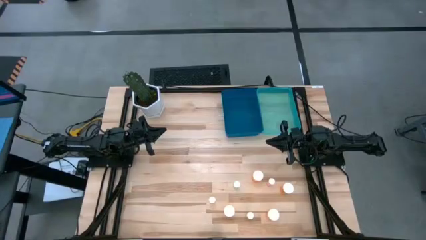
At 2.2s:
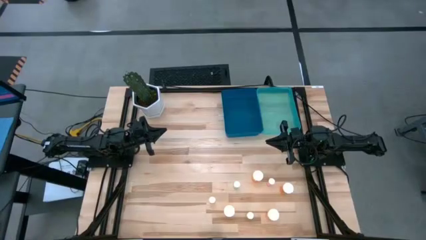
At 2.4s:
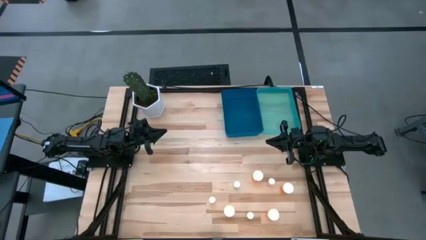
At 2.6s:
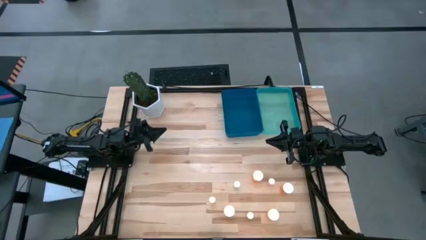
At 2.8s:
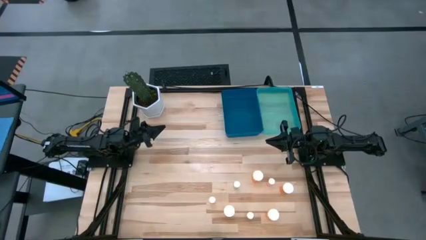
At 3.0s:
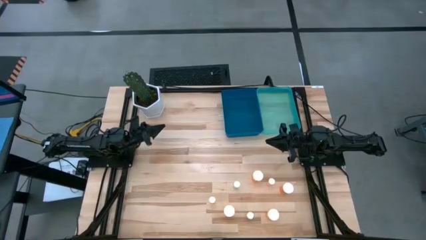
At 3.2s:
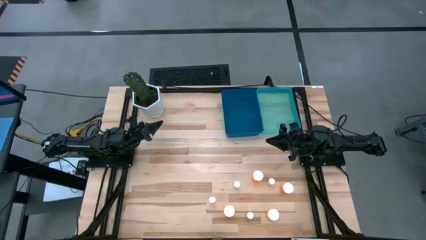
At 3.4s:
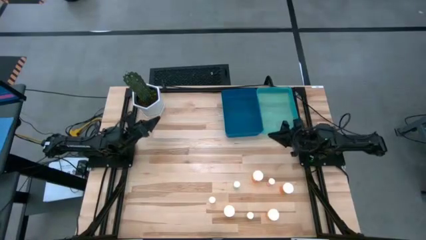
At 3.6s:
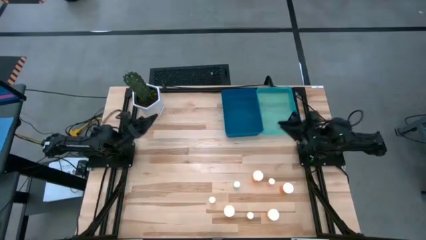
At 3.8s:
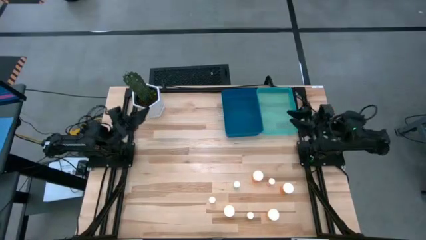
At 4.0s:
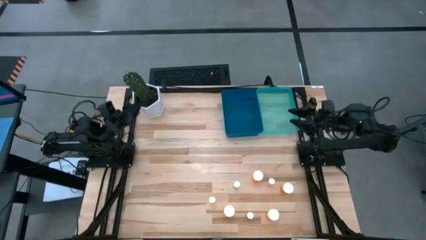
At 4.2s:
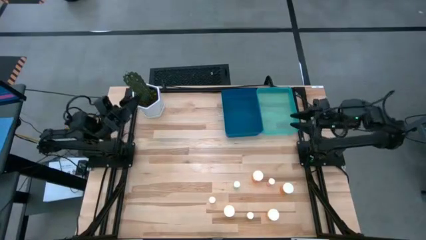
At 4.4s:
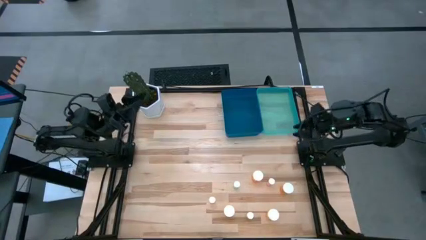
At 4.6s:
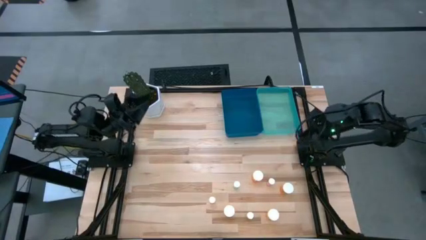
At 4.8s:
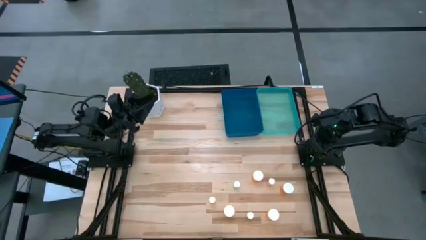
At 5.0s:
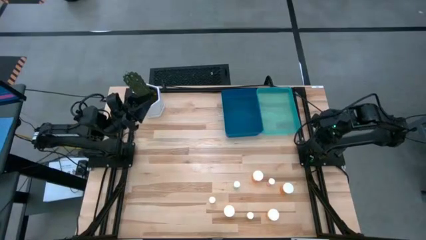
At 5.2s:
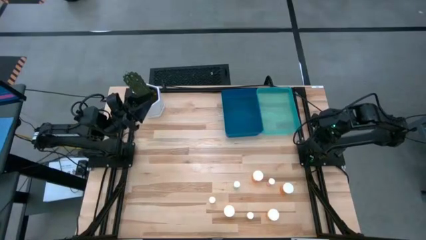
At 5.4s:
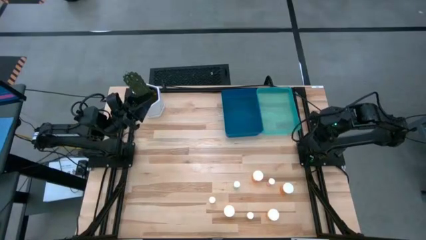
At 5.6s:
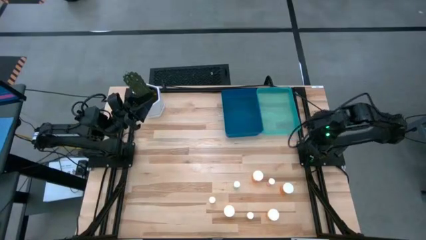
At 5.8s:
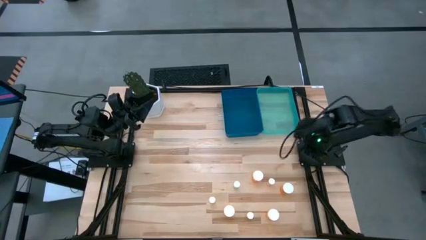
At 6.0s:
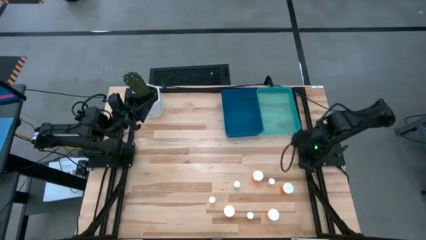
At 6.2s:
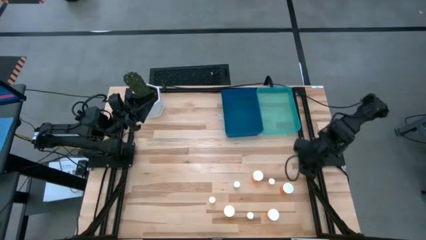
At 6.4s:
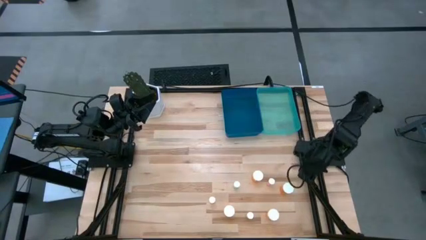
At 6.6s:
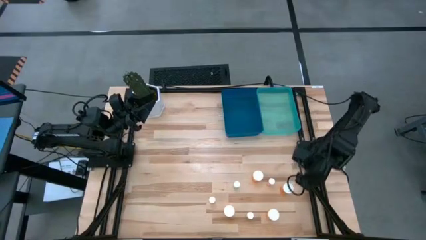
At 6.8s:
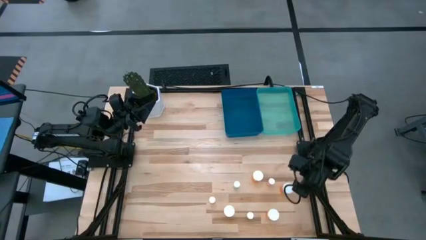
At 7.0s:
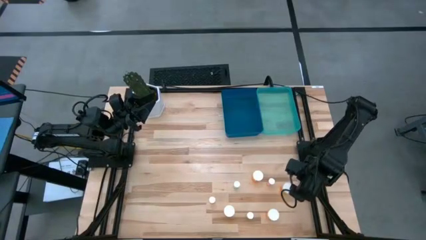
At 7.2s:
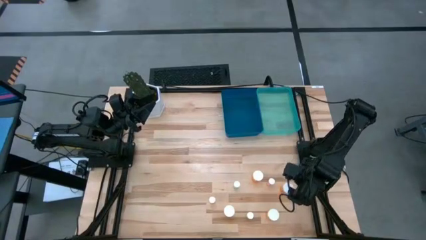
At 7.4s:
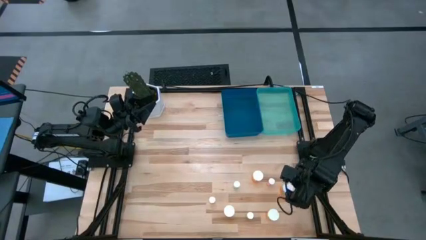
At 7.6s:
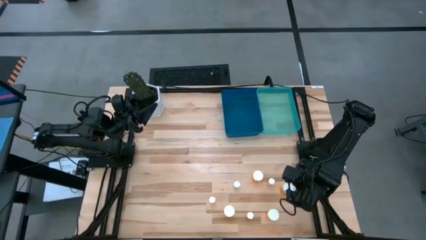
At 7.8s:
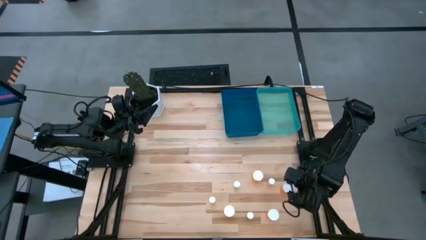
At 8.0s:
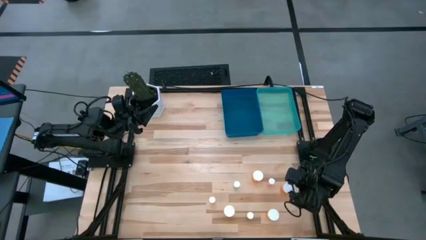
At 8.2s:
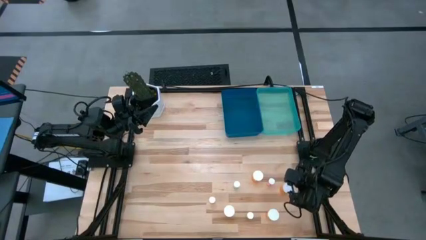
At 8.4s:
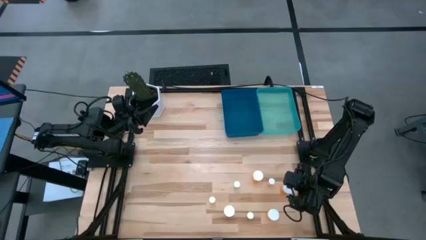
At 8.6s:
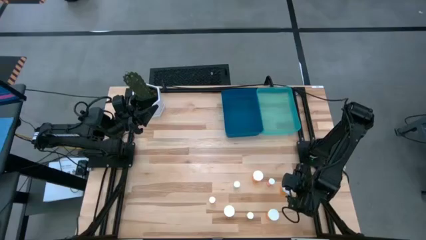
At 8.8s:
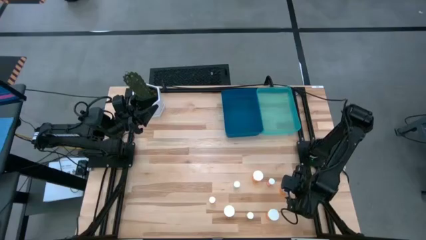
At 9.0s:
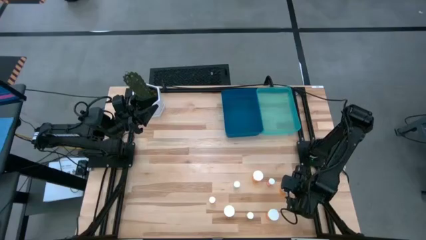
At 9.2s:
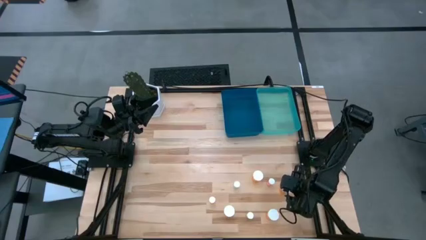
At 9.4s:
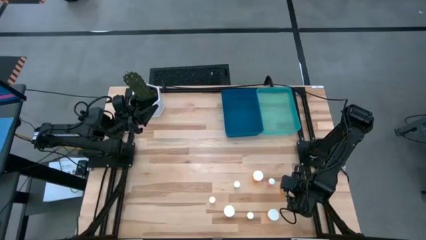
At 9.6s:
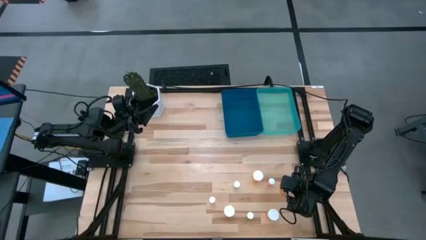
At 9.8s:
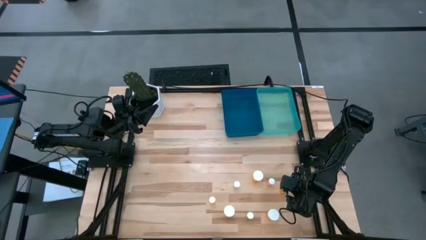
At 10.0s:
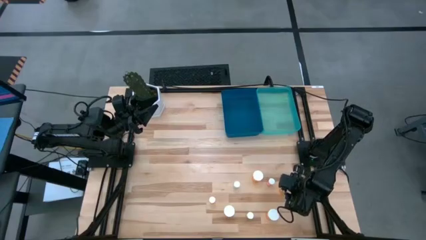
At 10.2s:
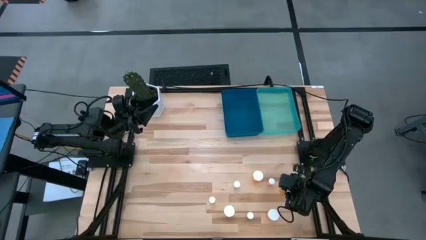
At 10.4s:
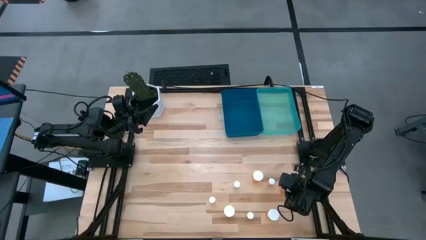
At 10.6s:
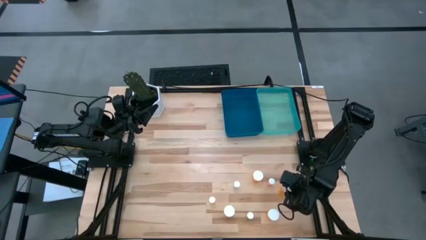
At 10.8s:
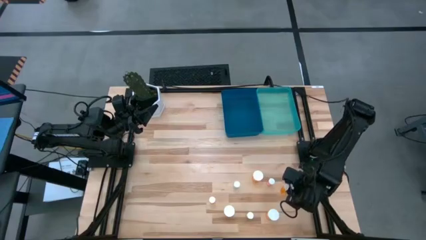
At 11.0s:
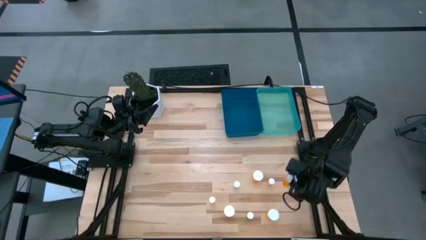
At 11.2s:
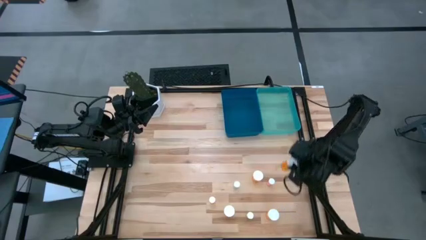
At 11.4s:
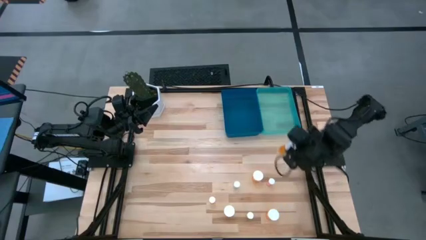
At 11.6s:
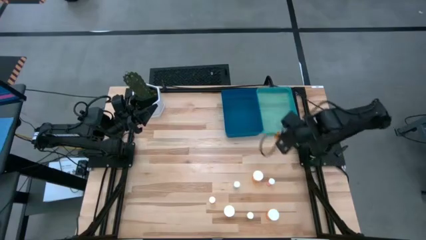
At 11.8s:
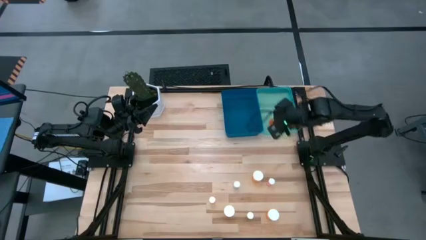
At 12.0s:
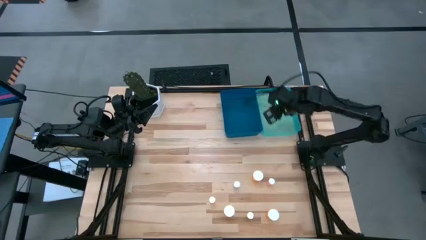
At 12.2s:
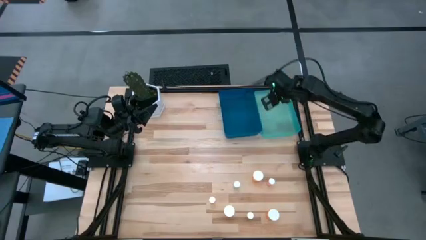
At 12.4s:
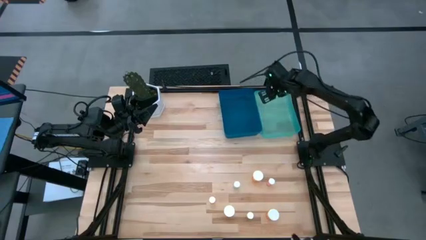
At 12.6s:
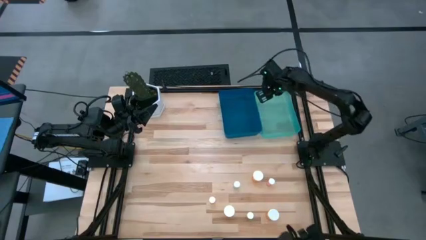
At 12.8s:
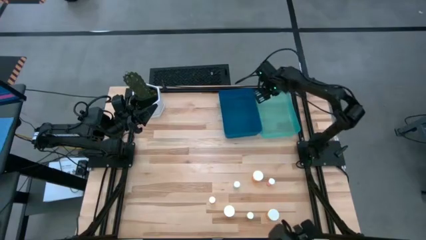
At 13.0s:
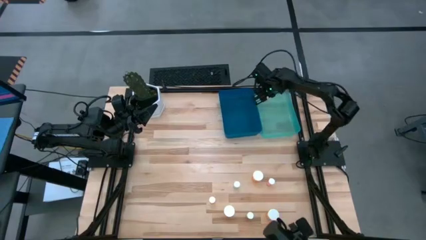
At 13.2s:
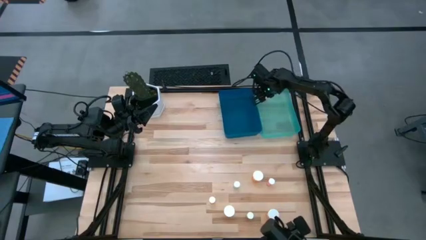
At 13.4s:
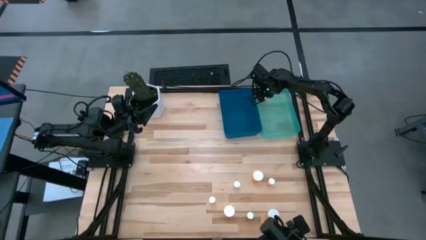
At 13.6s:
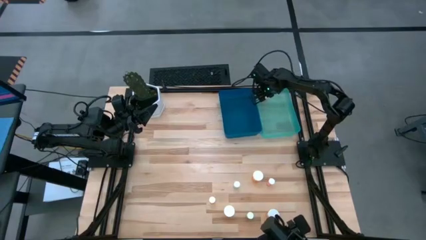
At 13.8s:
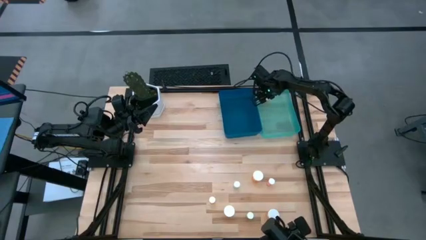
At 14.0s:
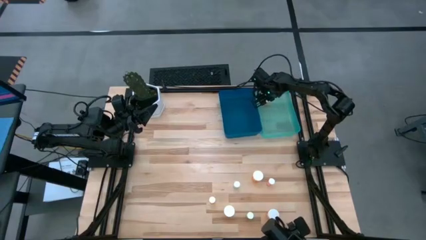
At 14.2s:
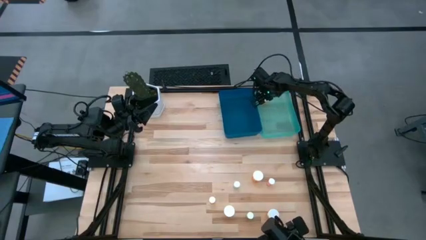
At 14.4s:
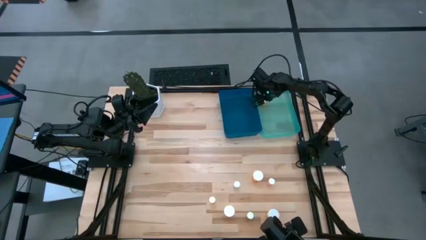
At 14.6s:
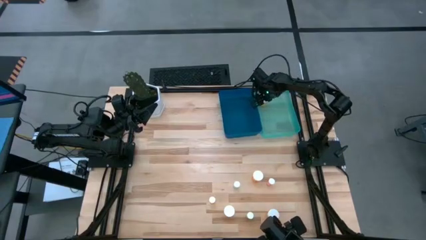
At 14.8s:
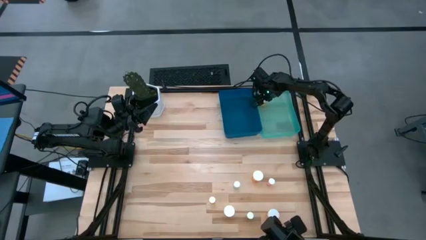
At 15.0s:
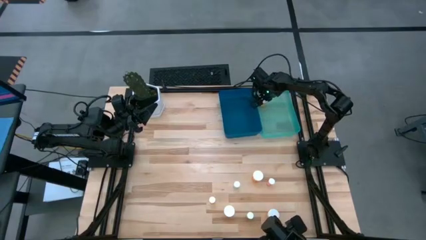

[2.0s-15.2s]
Task: Pick and place medicine bottles into bin by pill shape (circle, oval)
Put the orange capsule bottle into the light blue bin

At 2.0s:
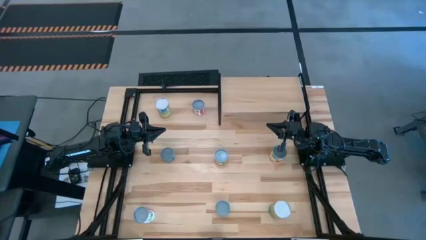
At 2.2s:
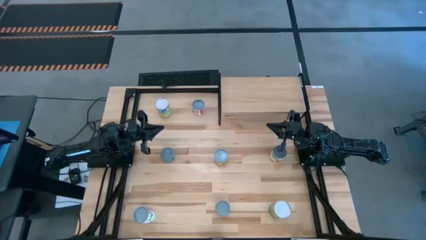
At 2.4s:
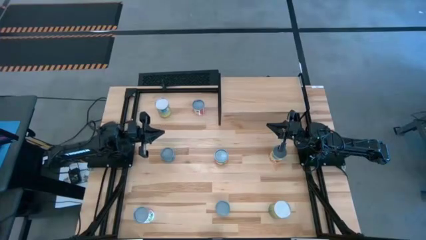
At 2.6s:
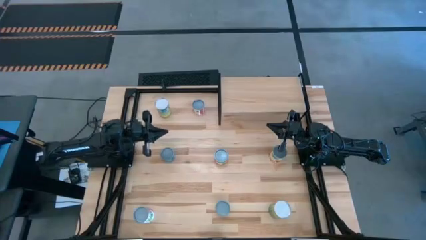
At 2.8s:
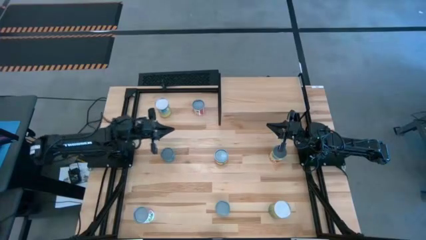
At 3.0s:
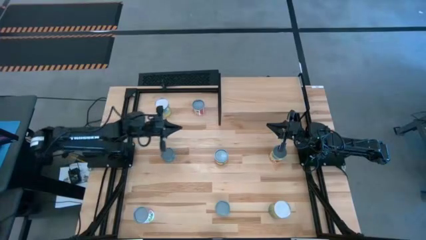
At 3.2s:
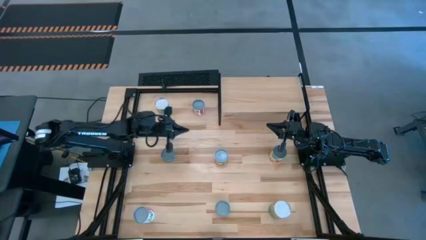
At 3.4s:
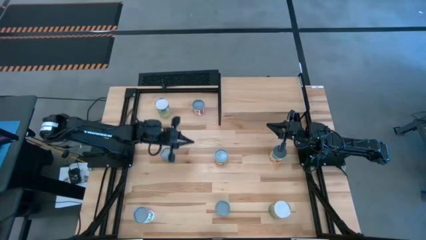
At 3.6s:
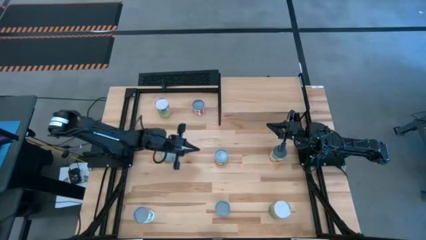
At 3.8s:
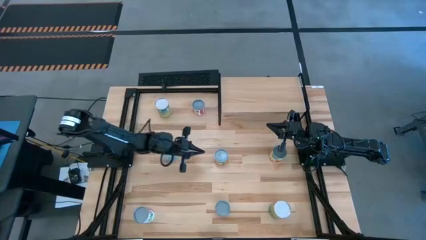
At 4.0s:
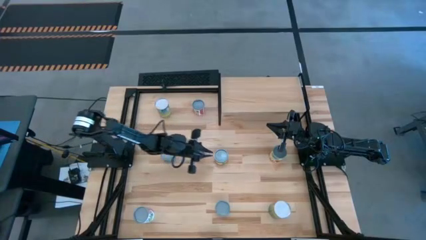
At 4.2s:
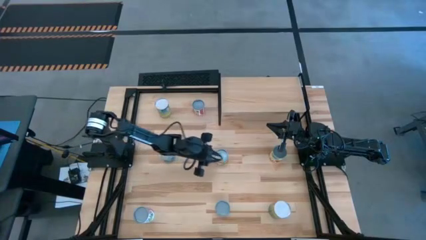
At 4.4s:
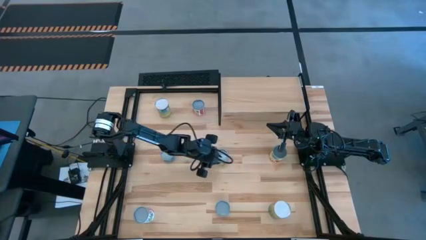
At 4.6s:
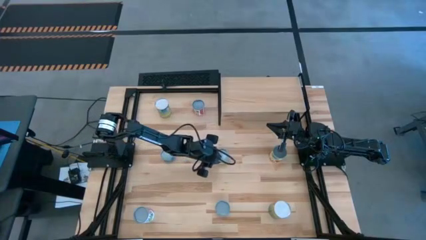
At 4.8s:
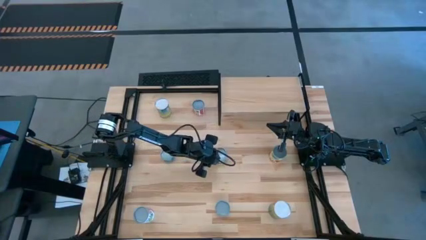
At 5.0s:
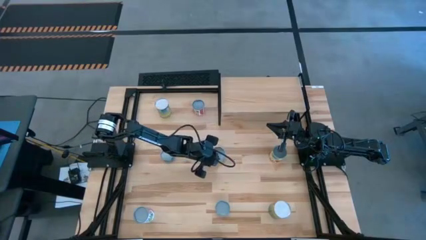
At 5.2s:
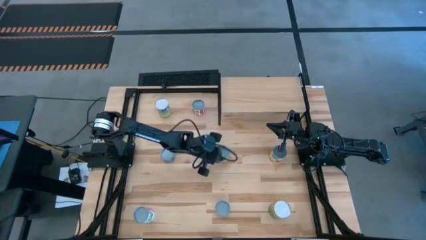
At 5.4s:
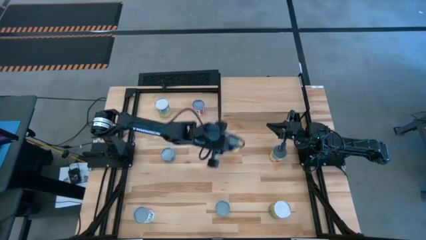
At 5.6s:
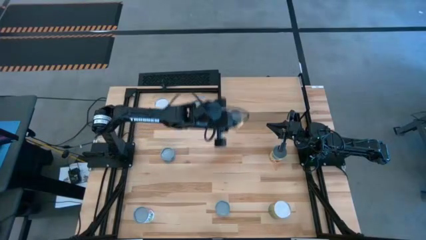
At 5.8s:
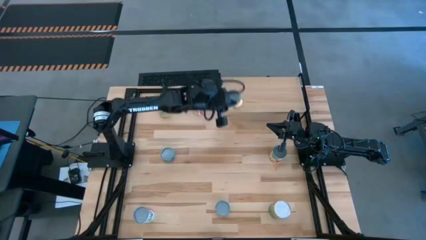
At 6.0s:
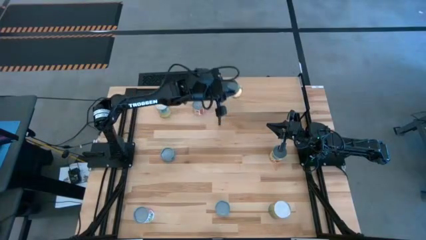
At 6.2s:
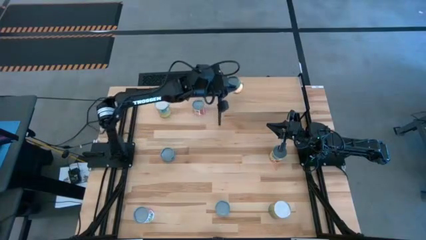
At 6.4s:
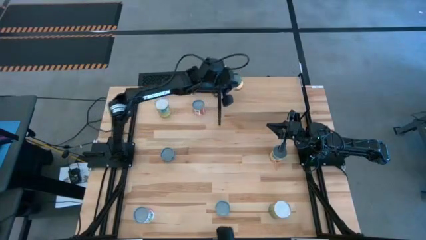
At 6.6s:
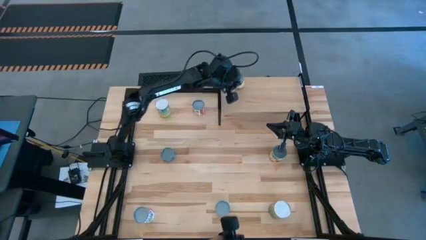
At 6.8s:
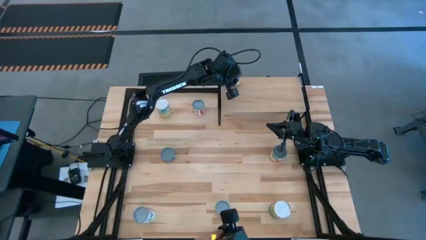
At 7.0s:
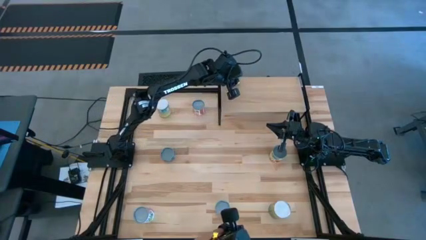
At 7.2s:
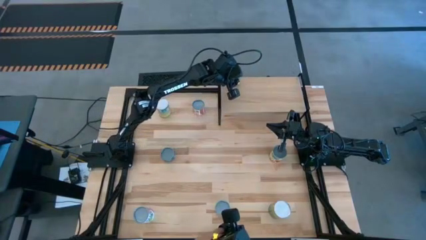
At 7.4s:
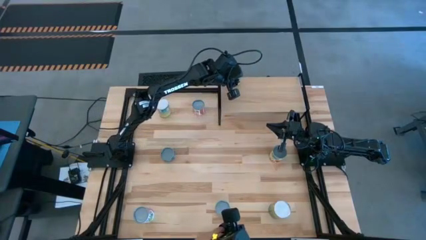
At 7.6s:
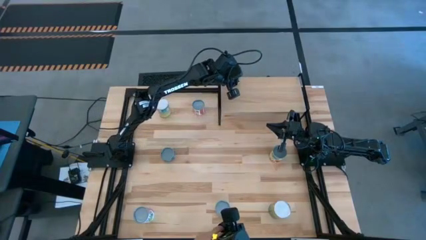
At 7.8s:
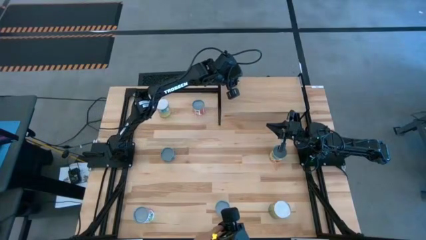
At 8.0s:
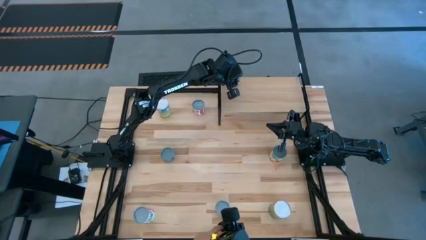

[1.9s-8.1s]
Task: Pick and place cans onto a shelf
Put the small canned oranges on the shelf
